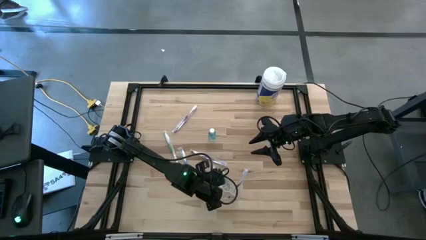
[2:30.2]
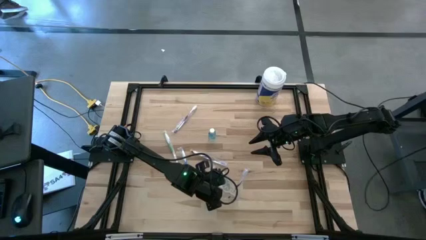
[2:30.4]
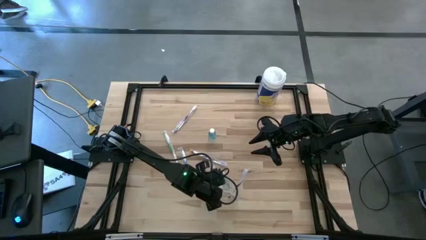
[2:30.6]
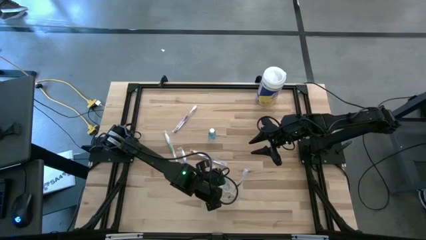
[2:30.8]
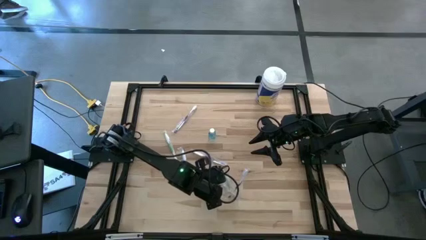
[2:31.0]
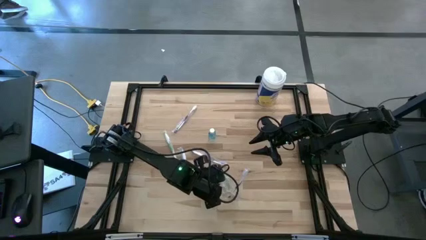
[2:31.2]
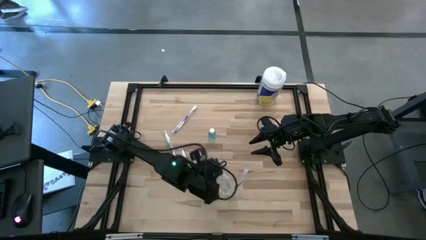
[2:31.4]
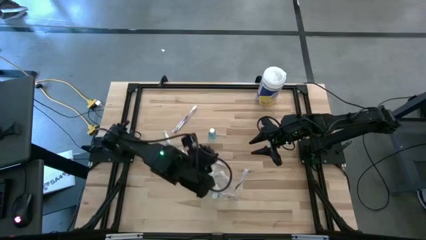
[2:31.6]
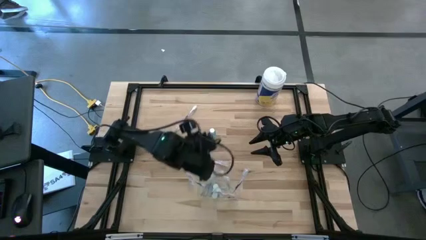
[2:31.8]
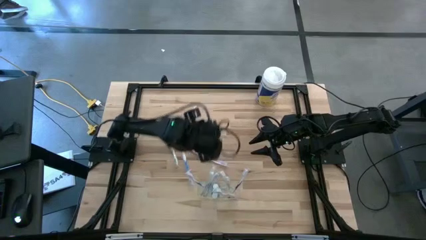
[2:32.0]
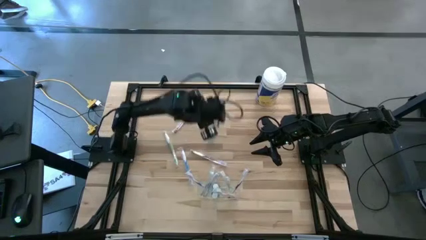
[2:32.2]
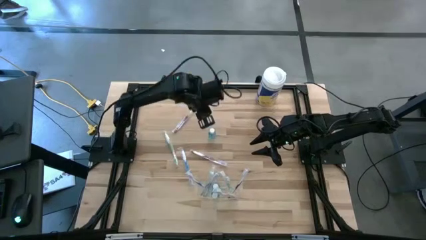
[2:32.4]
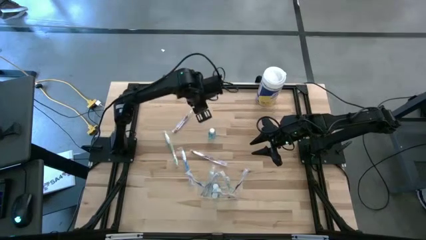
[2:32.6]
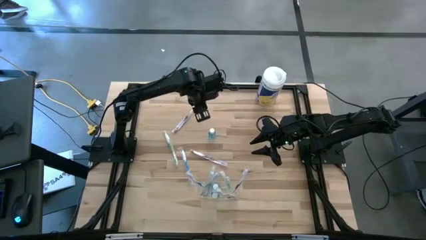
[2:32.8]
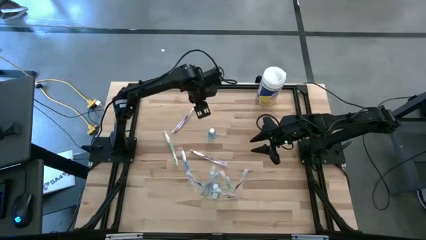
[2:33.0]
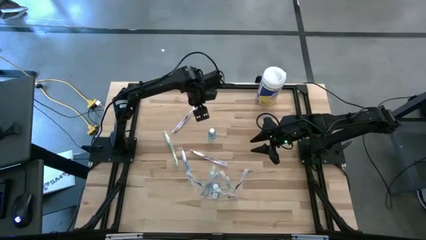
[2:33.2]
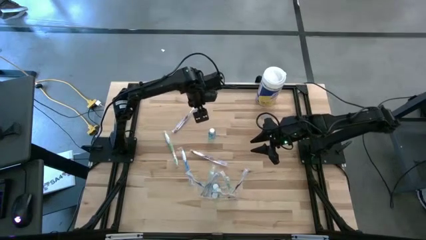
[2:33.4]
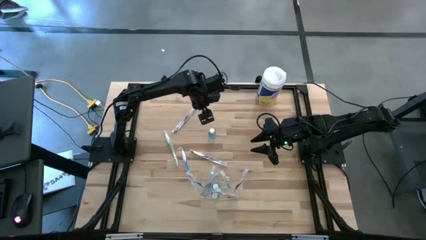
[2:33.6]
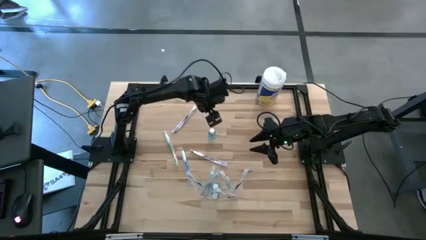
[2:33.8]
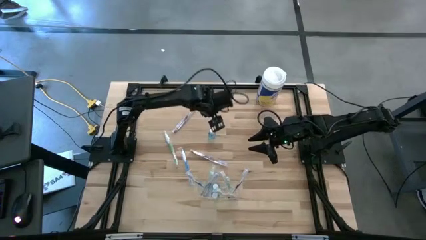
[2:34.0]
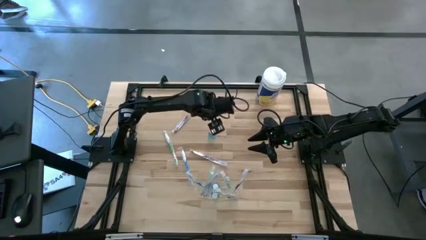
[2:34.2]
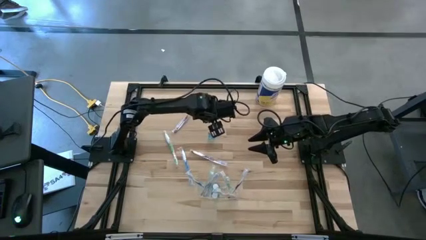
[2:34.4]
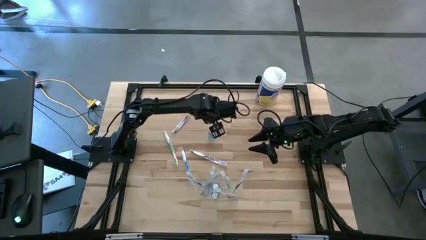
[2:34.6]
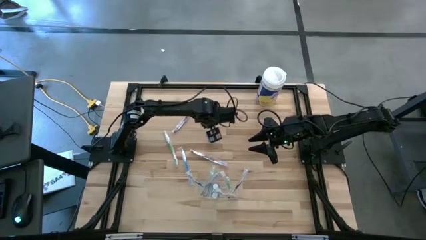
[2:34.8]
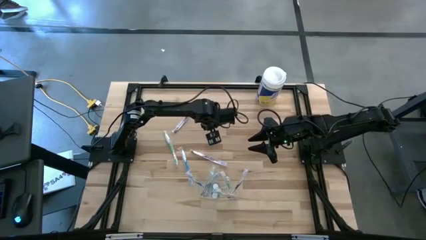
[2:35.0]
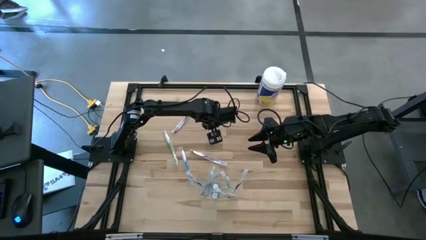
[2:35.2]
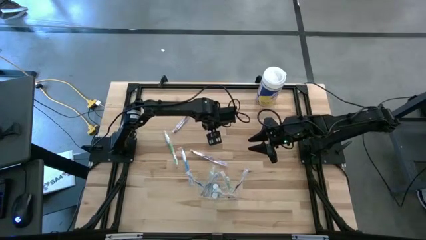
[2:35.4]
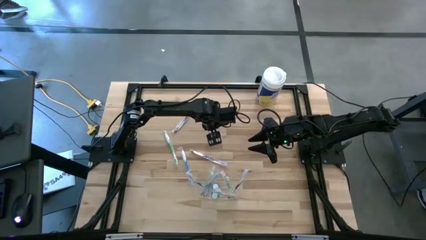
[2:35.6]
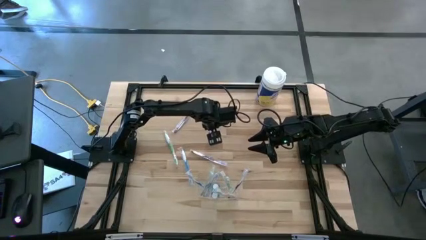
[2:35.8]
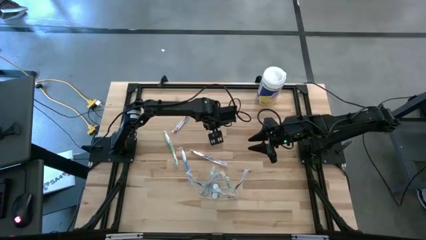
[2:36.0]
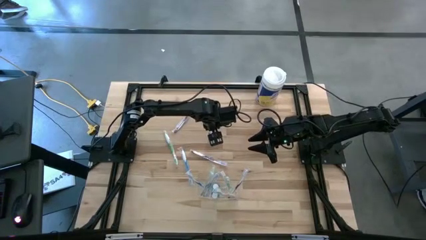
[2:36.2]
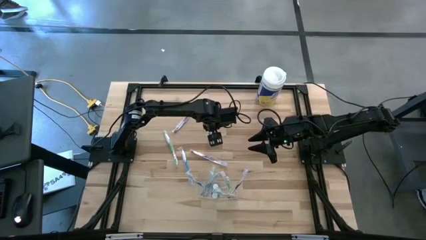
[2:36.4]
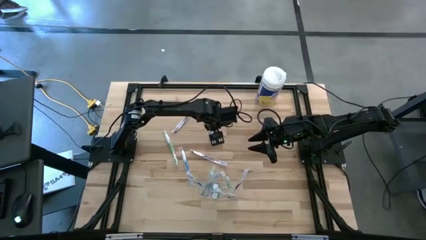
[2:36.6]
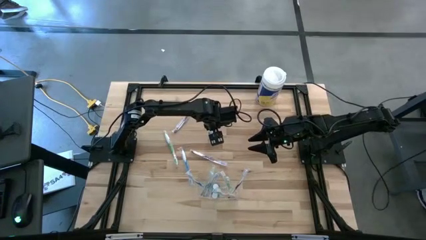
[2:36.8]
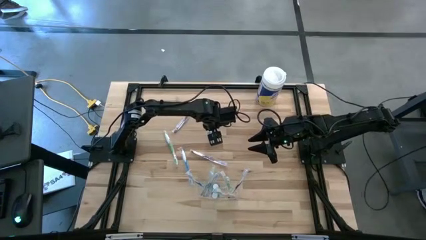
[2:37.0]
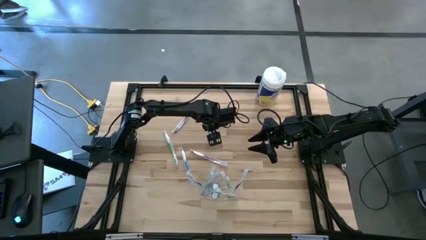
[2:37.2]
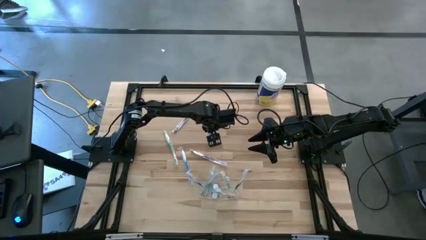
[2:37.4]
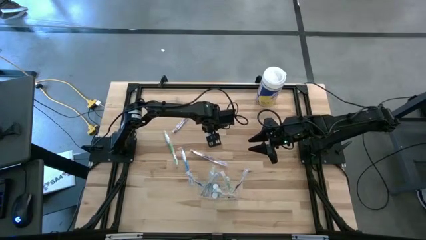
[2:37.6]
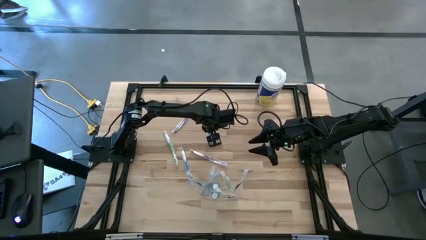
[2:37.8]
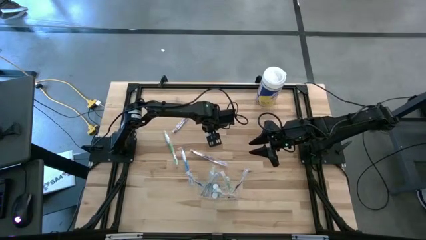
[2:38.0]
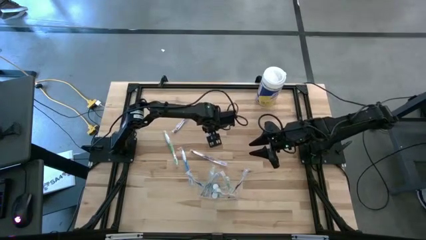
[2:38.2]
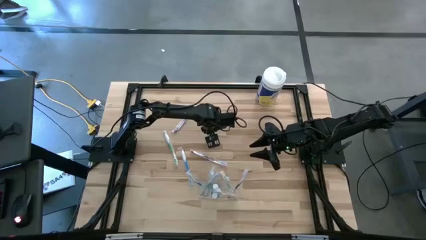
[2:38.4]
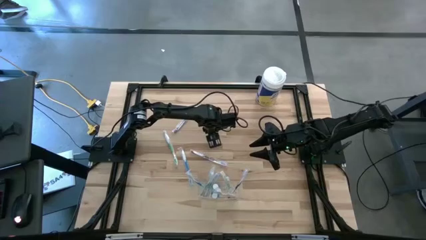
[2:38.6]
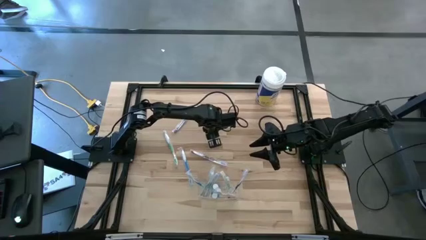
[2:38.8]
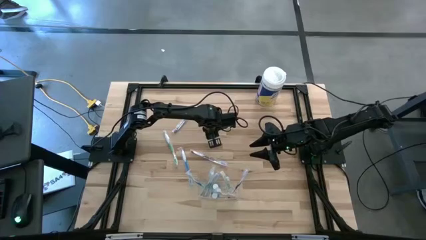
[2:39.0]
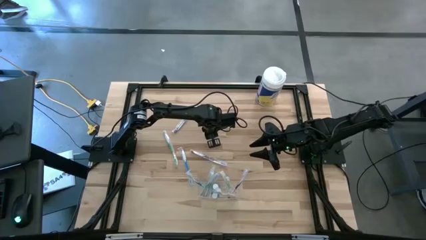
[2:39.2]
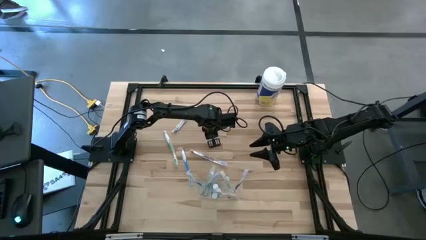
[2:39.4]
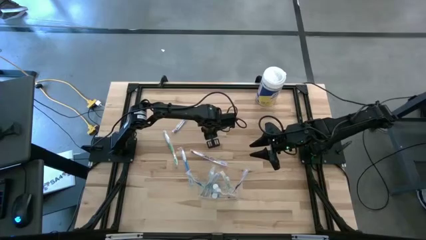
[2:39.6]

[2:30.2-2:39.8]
Task: Pick & Place toothbrushing station
Put the mouthwash into the transparent organizer

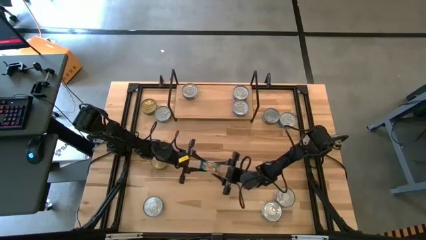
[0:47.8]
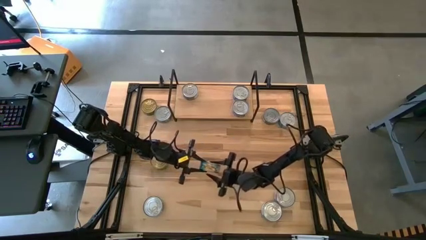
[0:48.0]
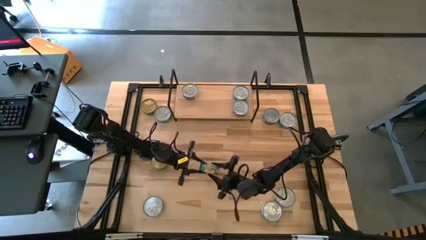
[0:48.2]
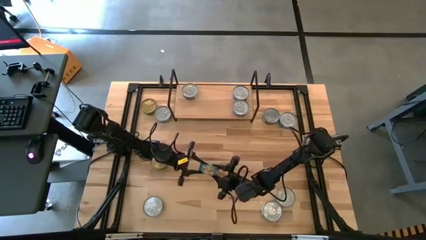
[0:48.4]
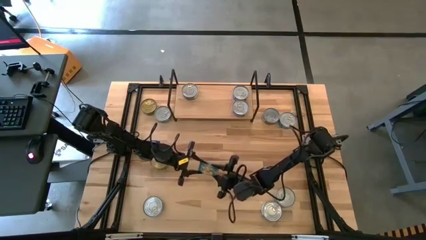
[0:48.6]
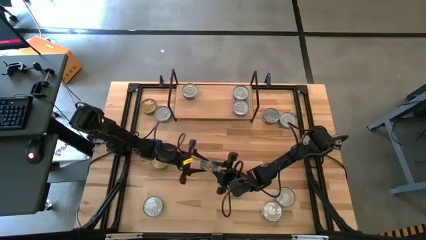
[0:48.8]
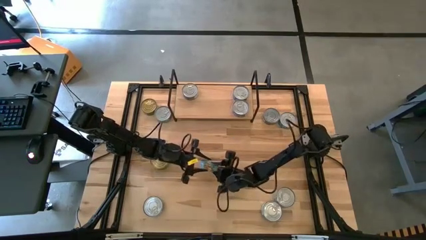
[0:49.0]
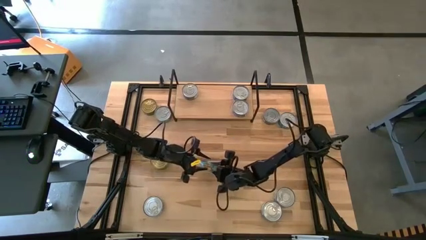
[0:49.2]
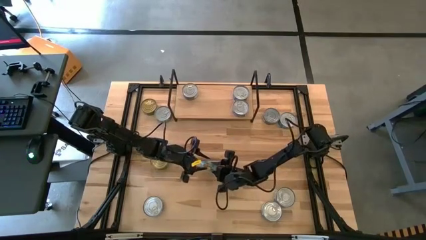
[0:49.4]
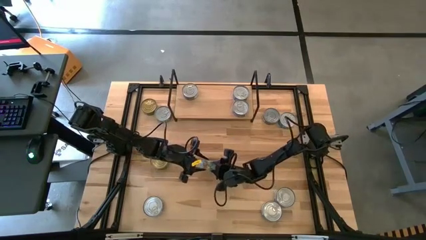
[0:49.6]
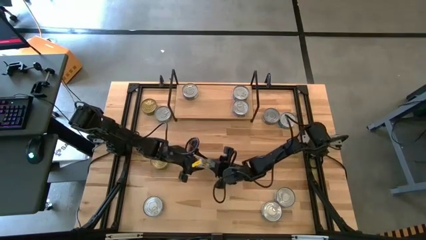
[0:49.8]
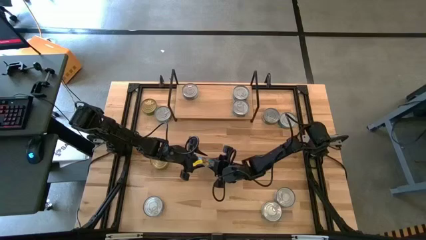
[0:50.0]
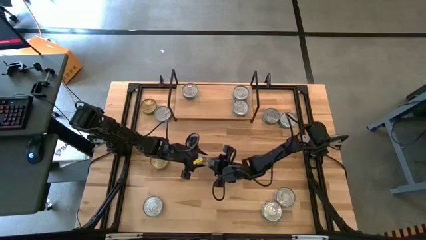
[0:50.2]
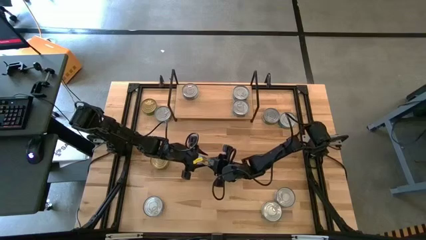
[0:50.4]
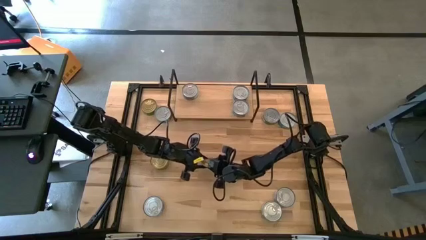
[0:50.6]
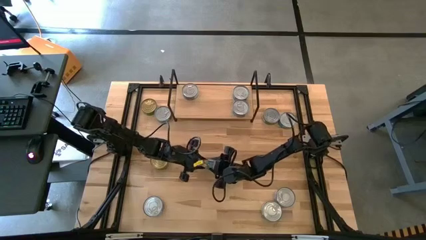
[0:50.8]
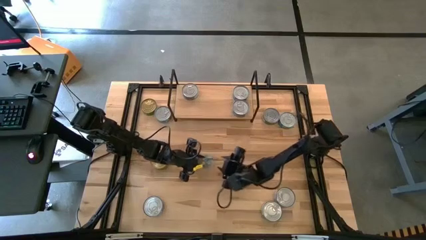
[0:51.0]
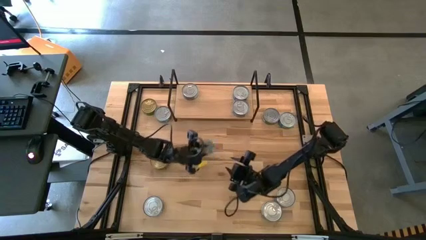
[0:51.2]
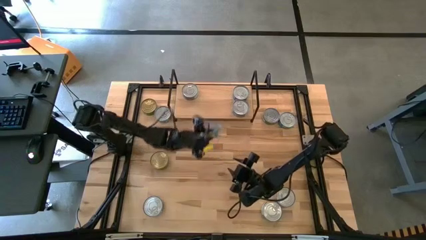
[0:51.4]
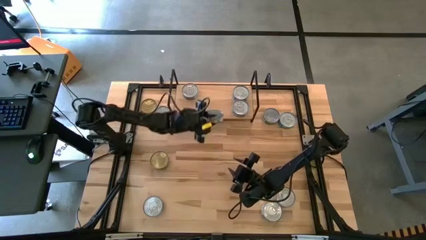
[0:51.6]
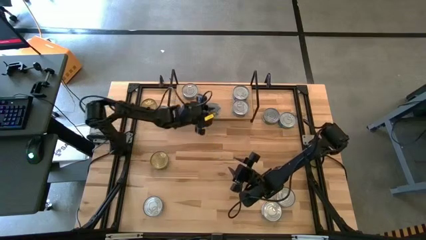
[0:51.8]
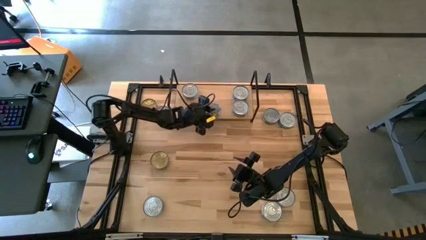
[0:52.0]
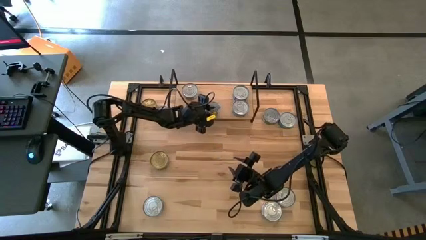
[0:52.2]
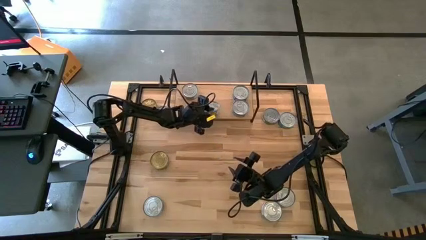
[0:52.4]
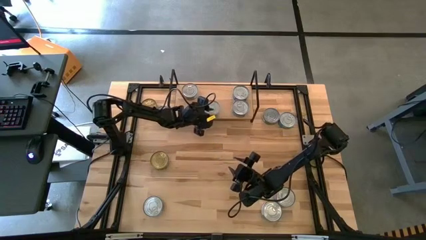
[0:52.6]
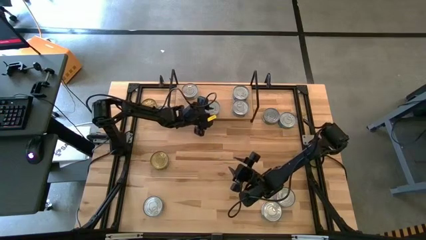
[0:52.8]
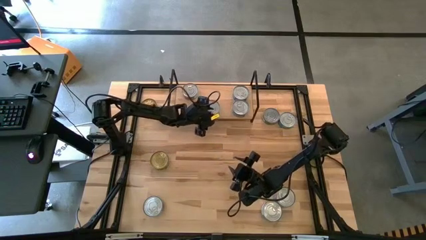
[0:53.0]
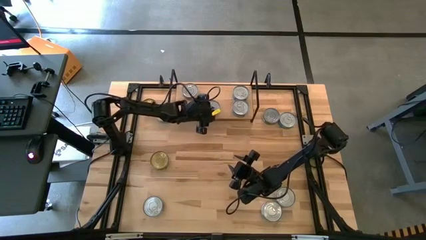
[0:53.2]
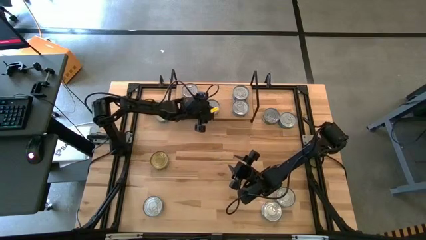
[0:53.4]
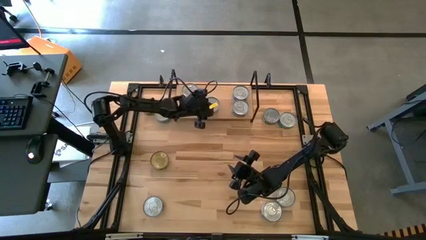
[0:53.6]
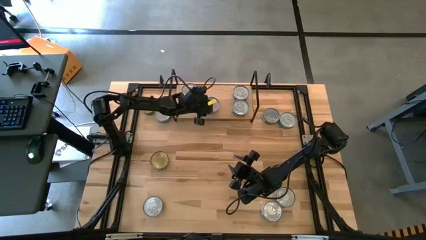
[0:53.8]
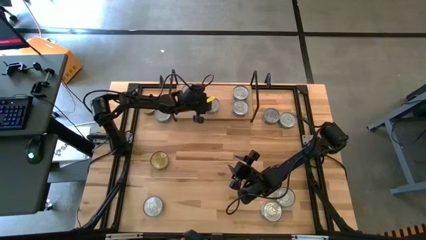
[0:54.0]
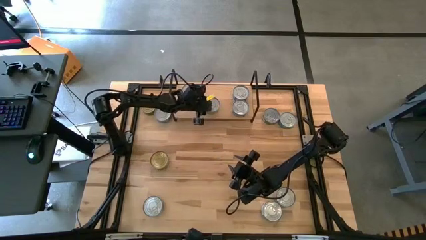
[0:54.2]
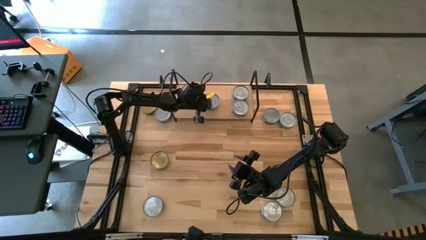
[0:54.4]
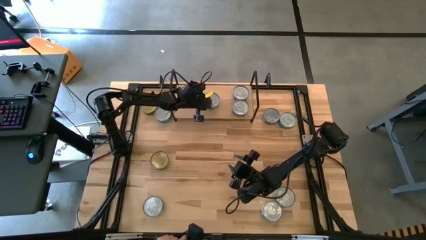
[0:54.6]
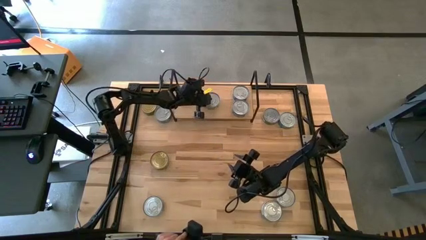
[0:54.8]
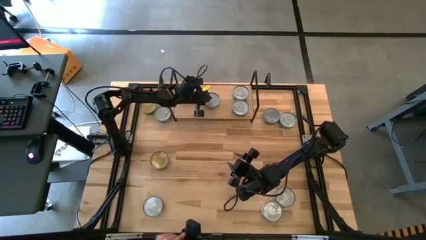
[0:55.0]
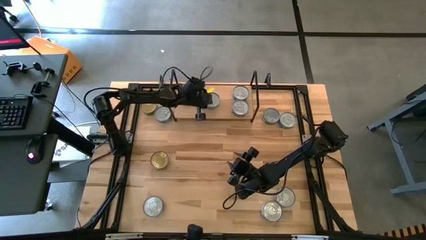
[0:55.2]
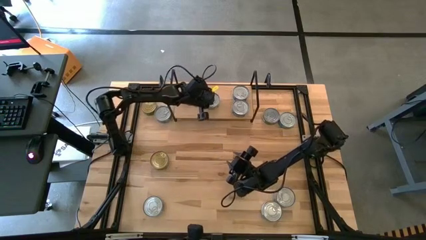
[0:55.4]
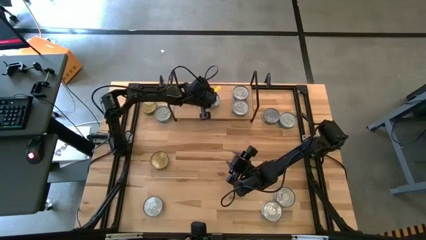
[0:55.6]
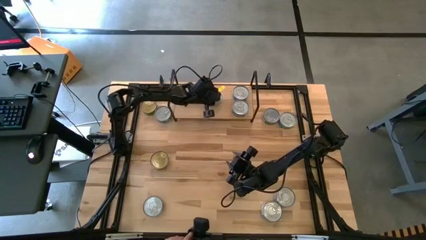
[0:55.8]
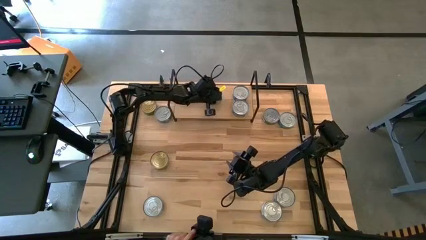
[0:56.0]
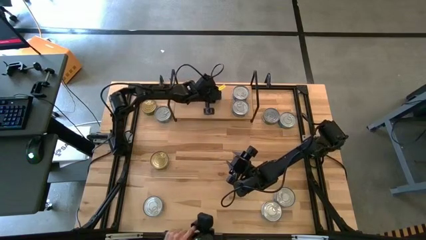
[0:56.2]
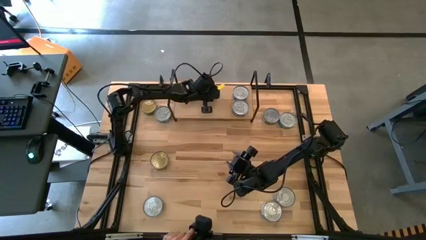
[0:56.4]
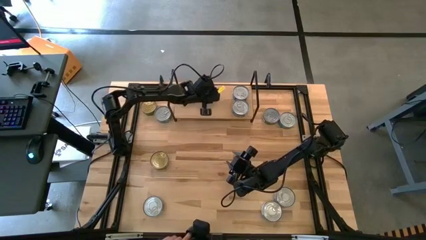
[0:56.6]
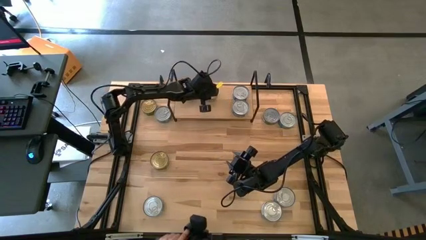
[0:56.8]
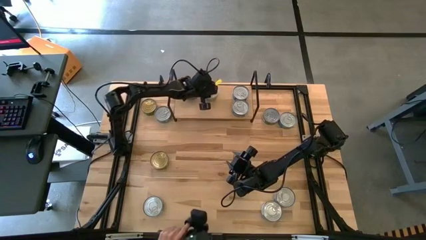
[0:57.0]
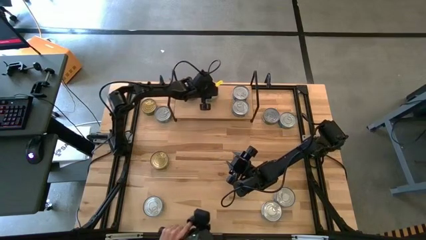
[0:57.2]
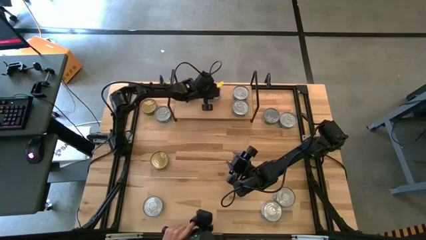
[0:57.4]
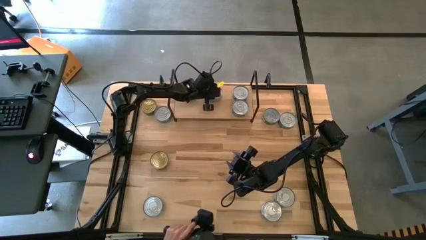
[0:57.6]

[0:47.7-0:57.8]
Task: Stack canned seafood by type on shelf
Put the yellow blue tuna can on the shelf
